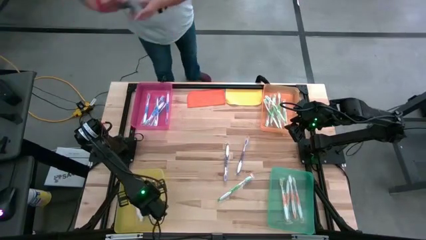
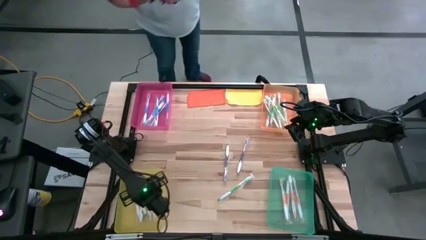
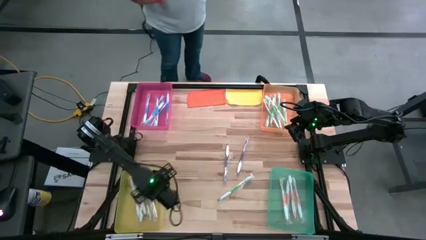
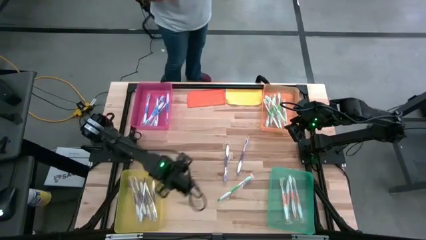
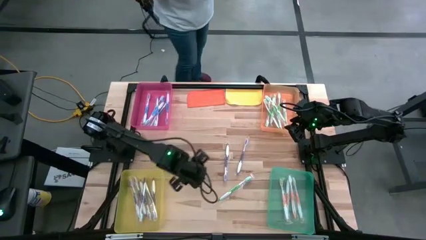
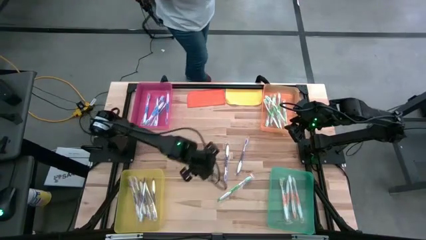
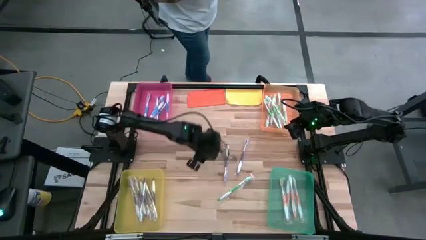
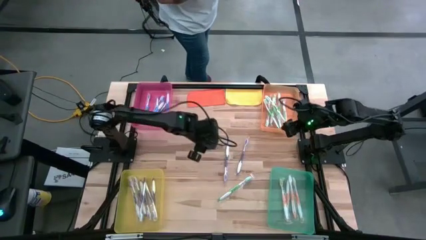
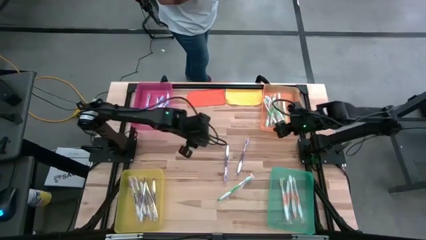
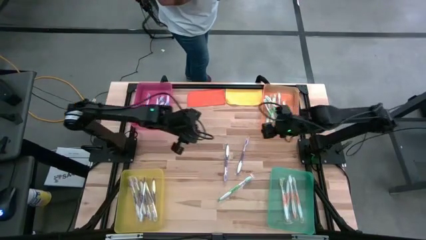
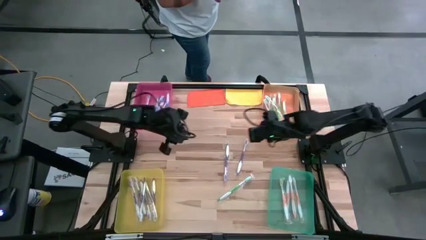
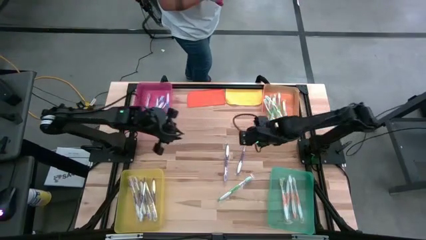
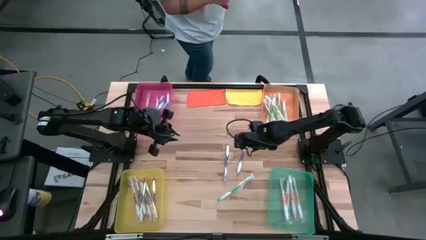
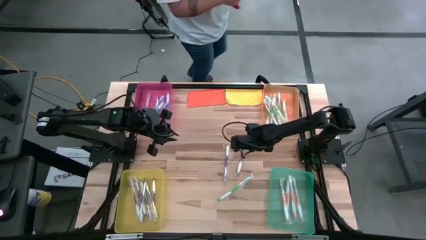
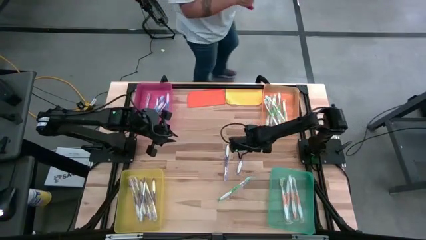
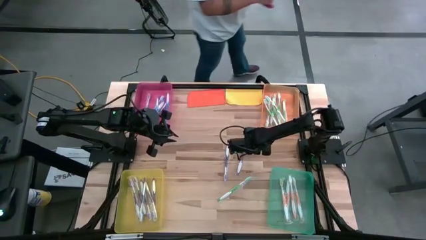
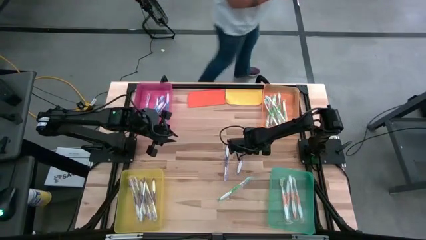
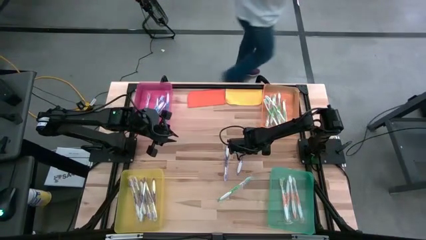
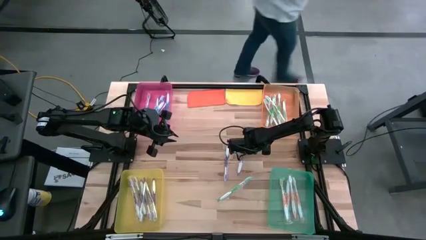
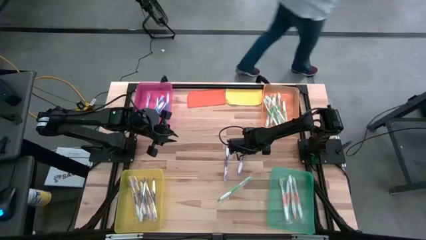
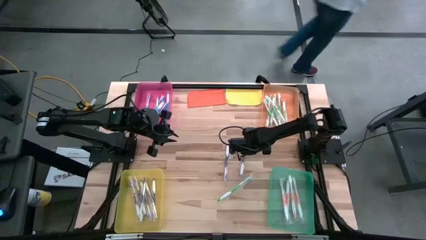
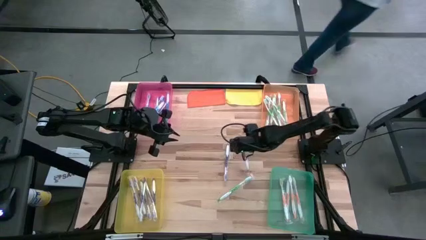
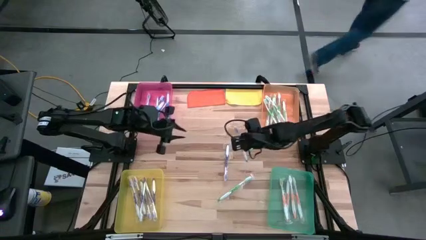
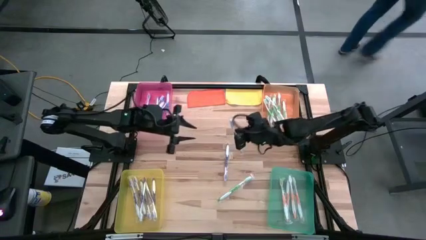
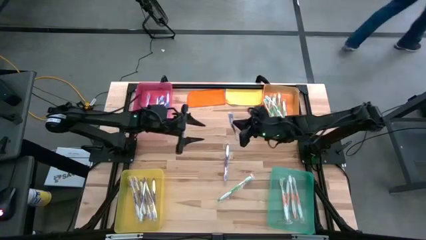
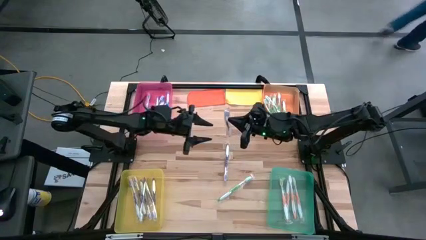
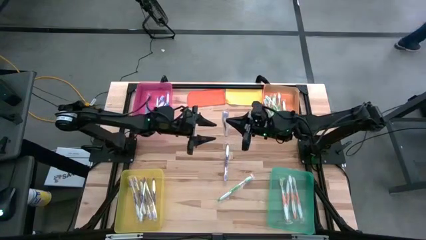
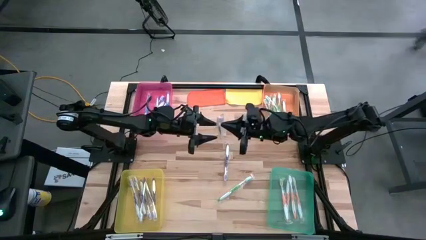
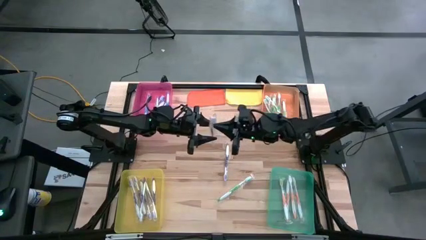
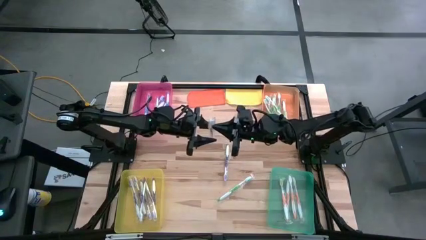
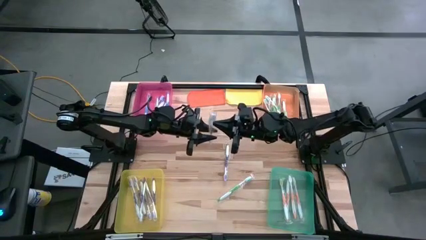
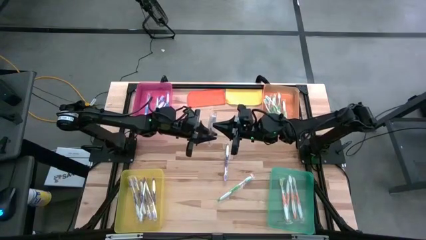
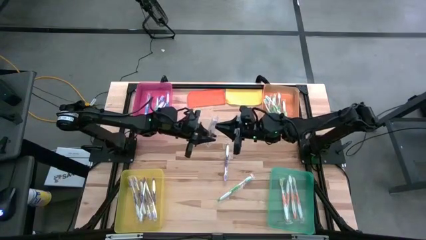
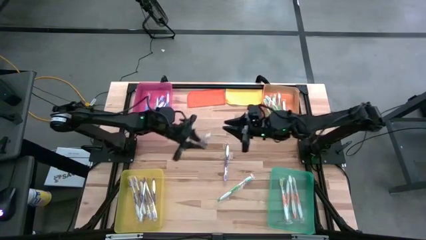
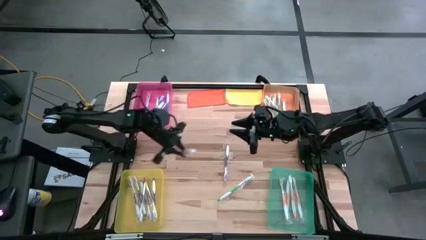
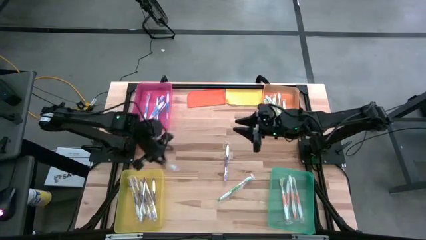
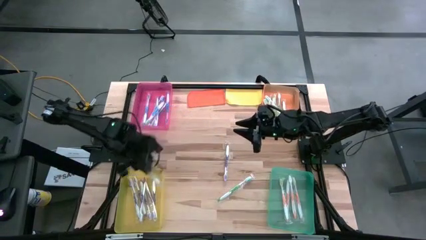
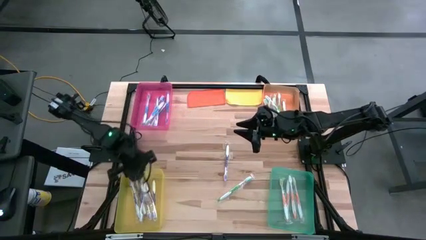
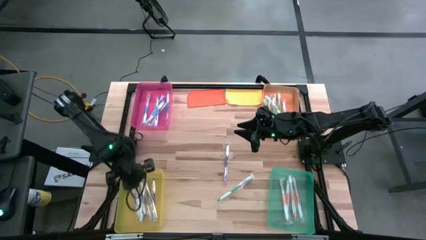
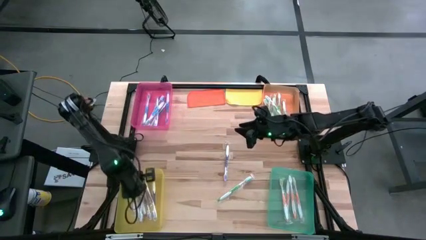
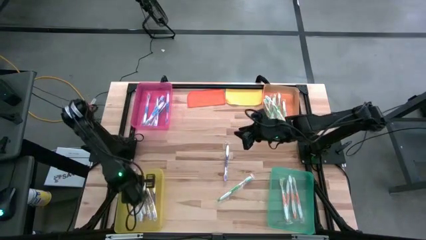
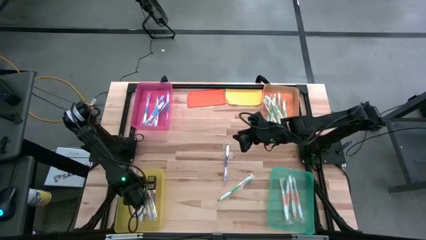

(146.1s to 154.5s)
Task: Pick & Place Toothbrushes
Put the purple toothbrush into the yellow bin

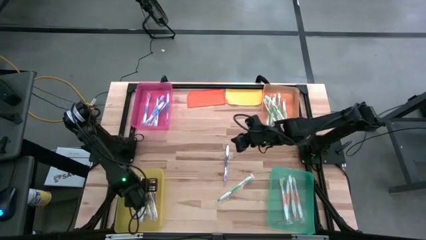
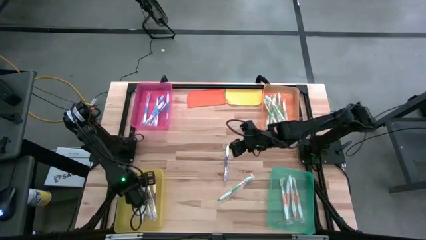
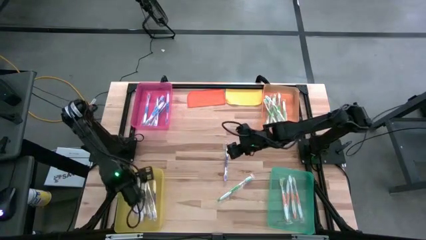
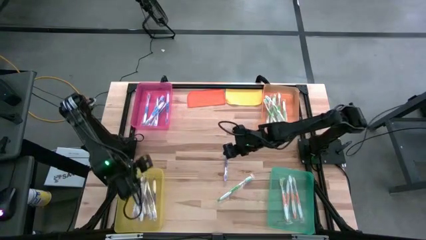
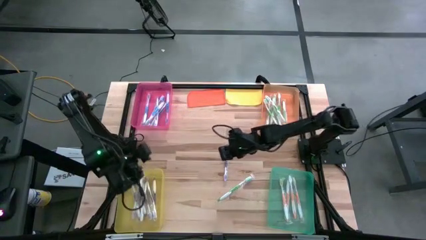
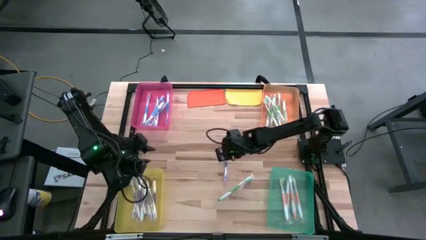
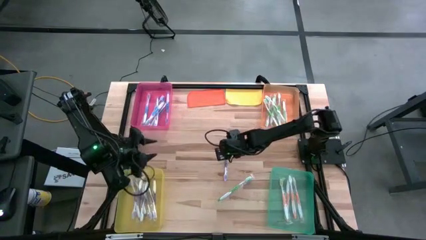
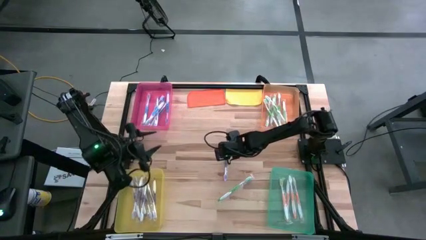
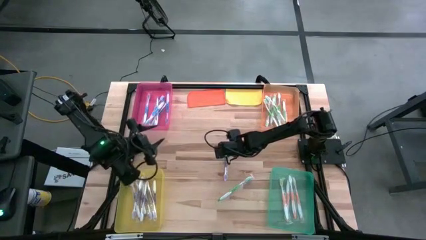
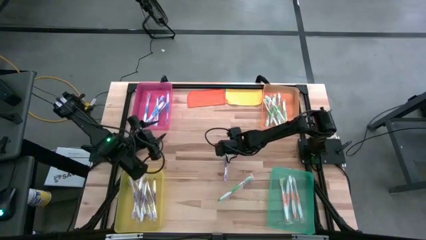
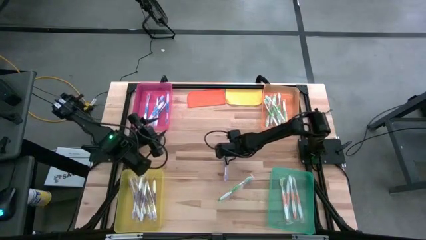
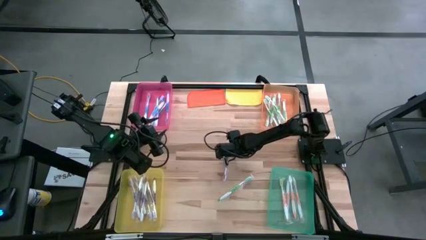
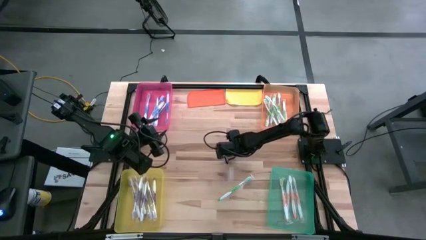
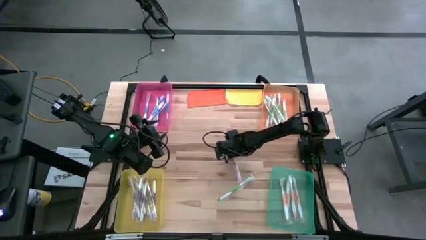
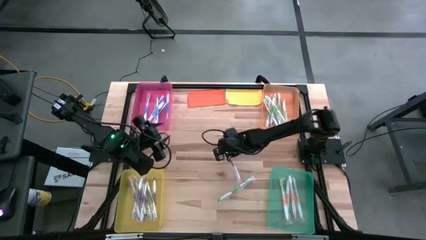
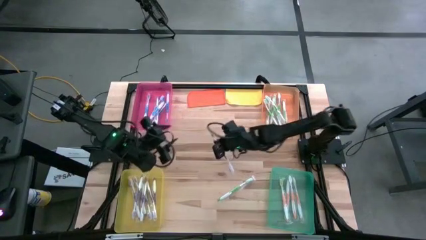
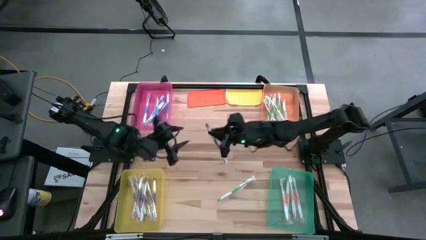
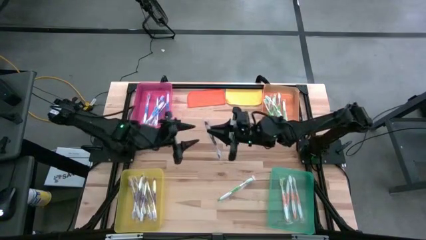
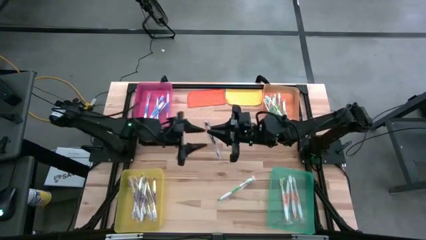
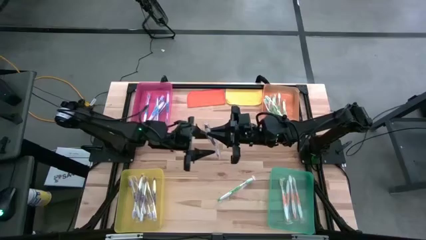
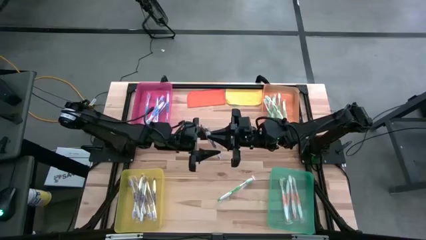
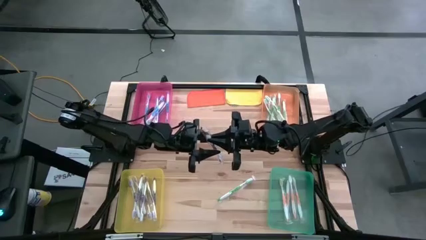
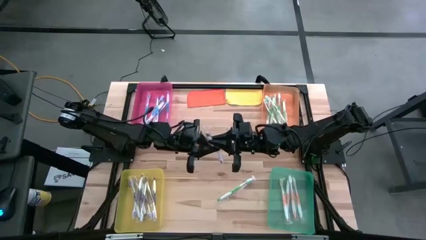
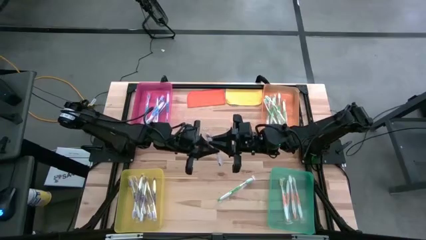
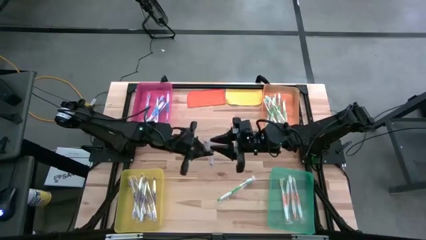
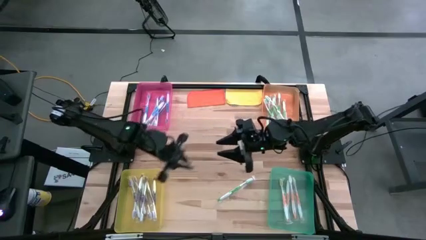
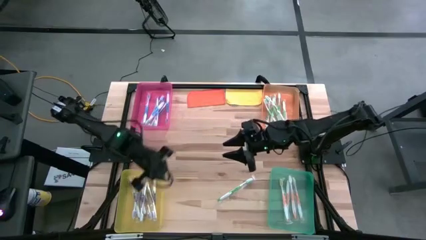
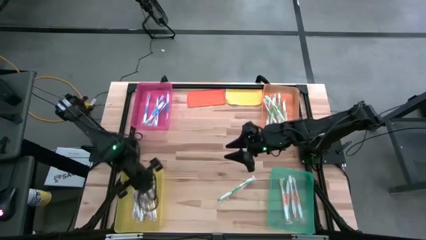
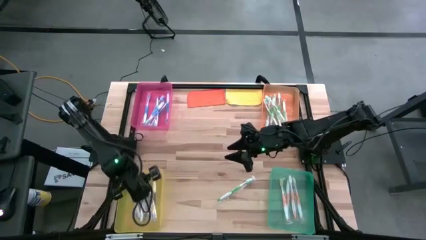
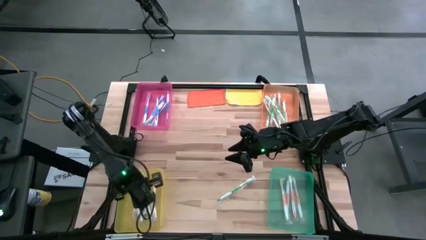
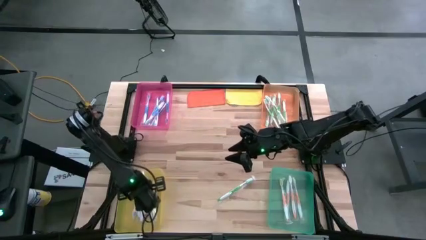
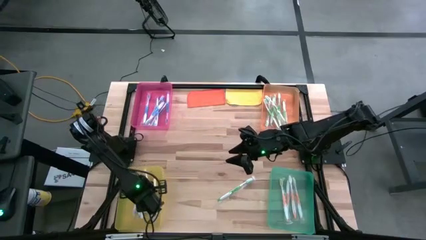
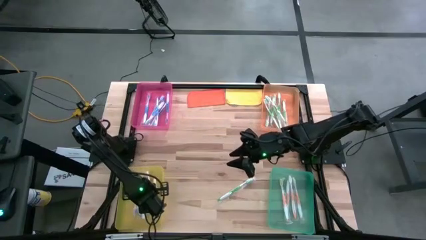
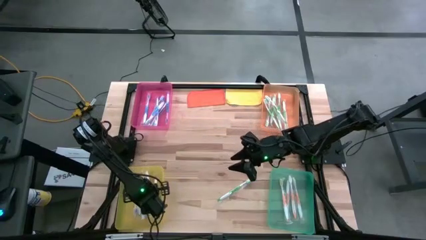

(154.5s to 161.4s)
Put the purple toothbrush into the yellow bin

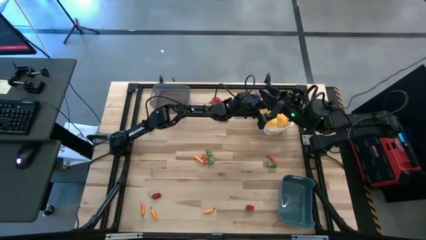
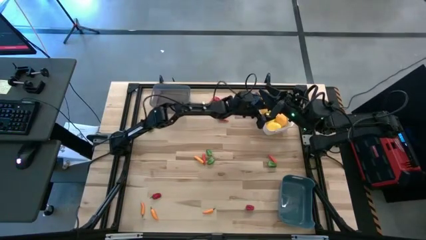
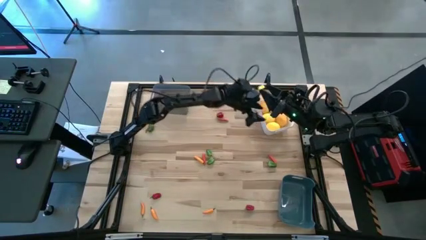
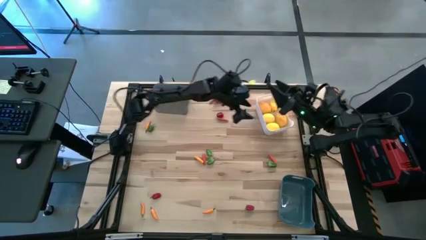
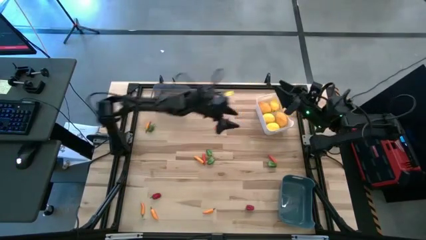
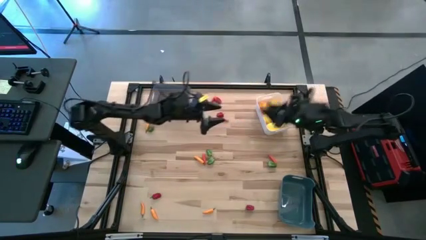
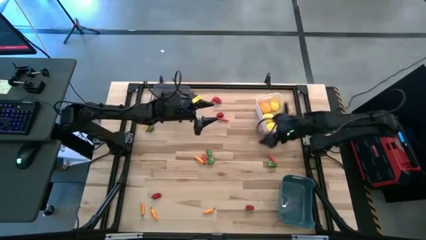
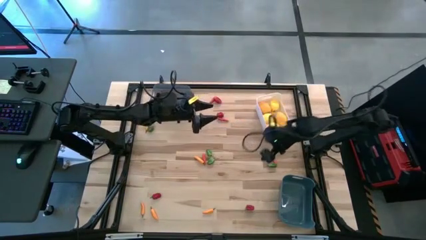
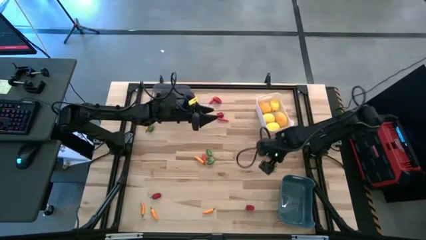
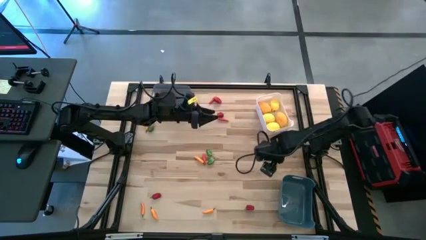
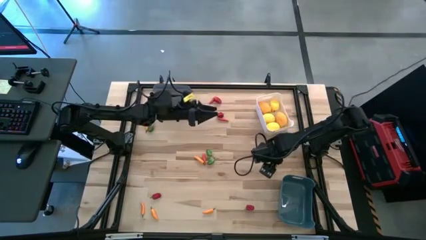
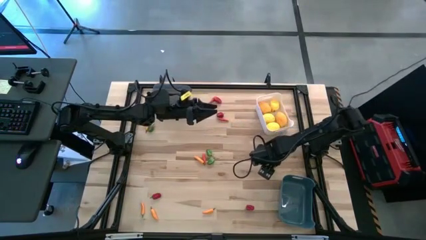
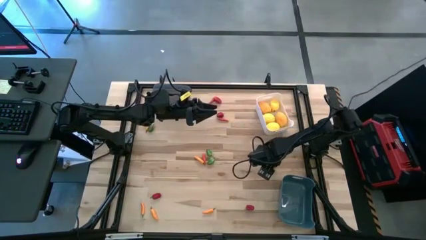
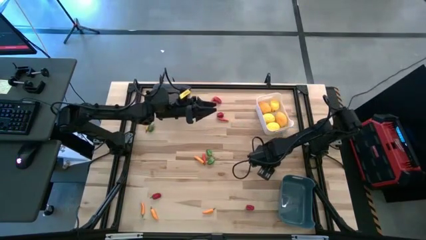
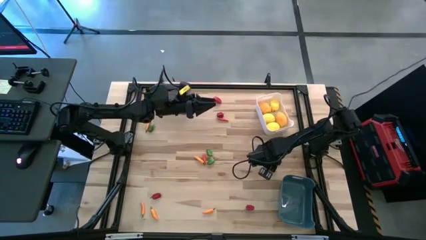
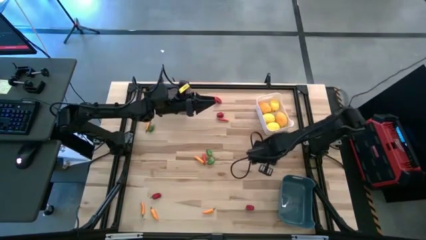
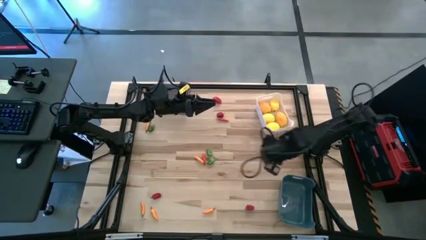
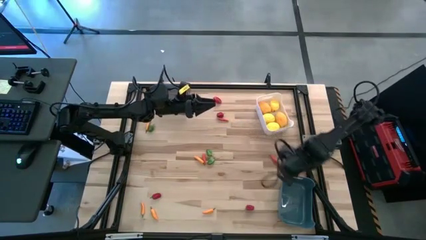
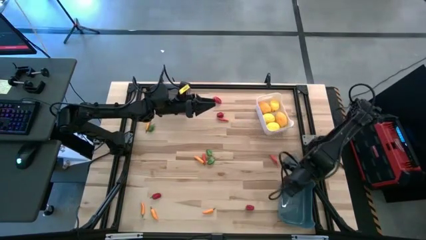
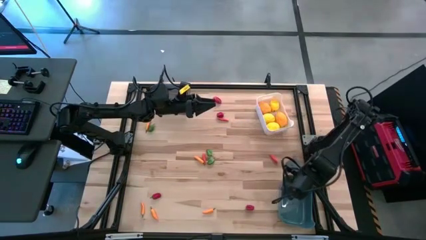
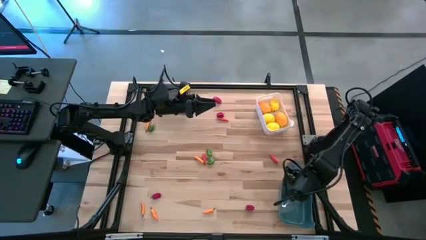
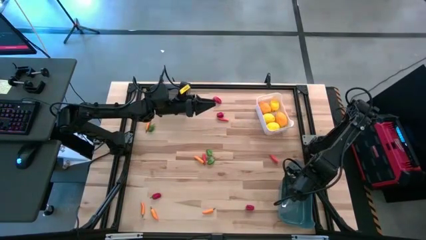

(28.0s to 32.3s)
Task: Sort produce into baskets
Put the green chili pepper into the blue bin
